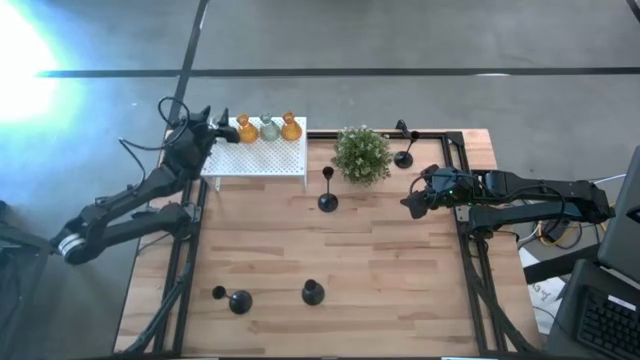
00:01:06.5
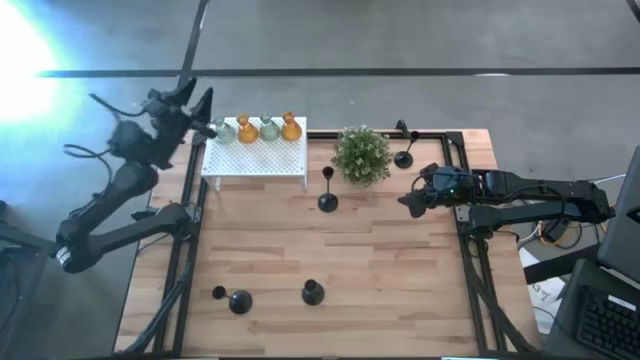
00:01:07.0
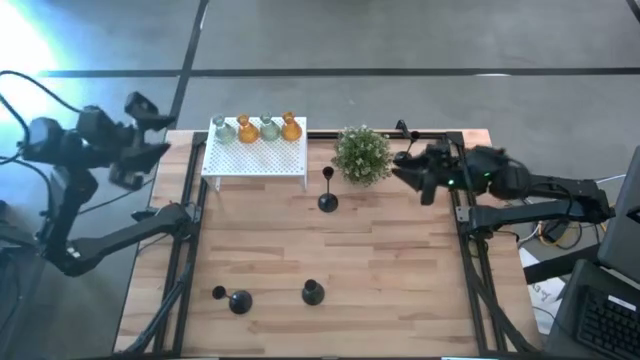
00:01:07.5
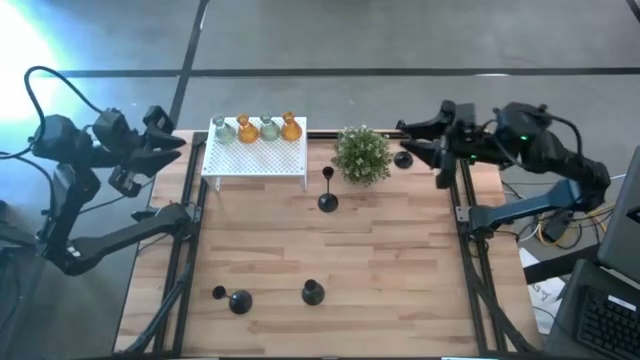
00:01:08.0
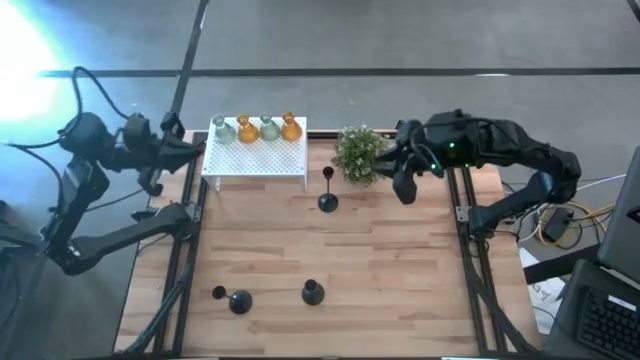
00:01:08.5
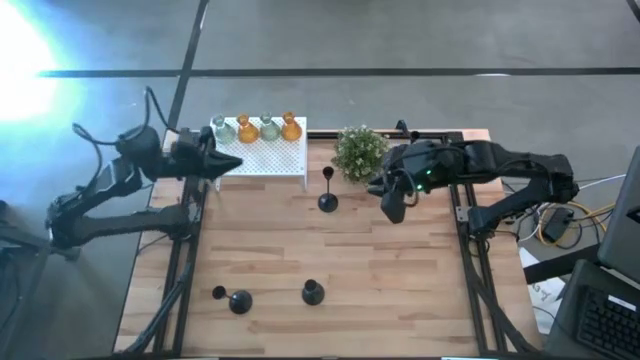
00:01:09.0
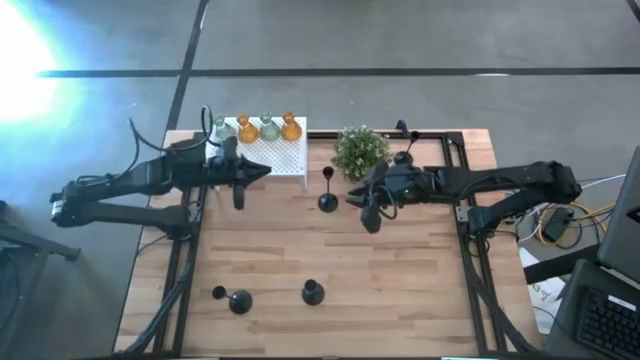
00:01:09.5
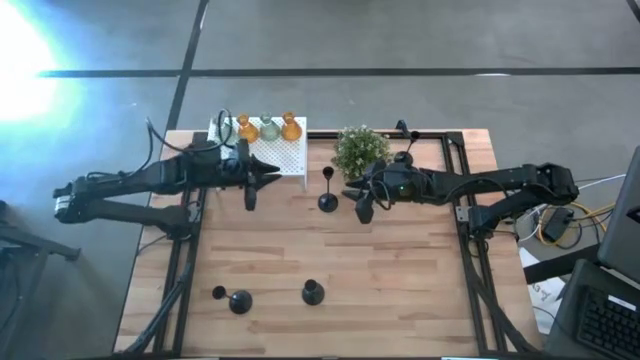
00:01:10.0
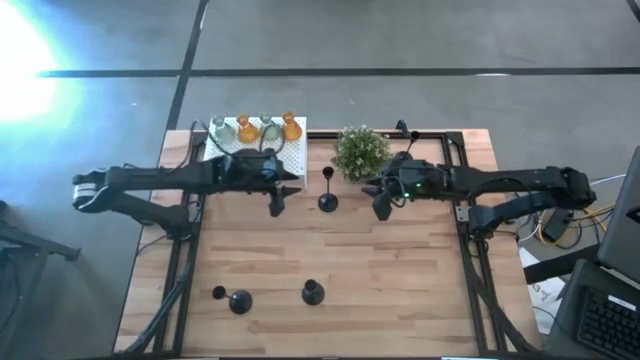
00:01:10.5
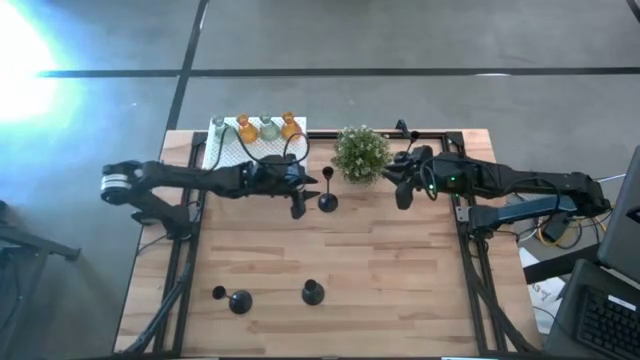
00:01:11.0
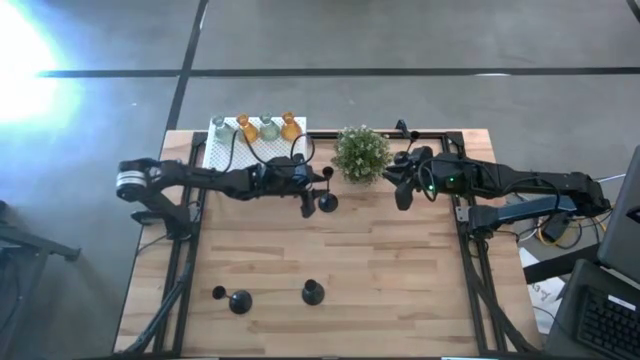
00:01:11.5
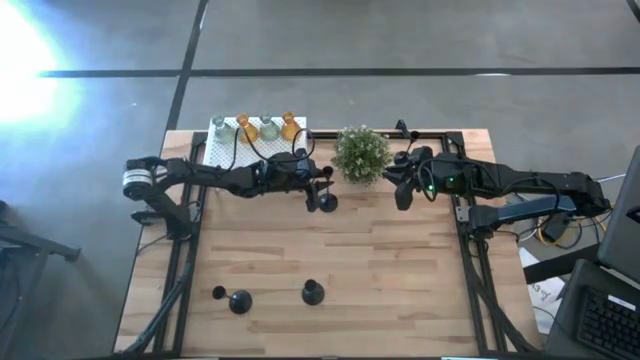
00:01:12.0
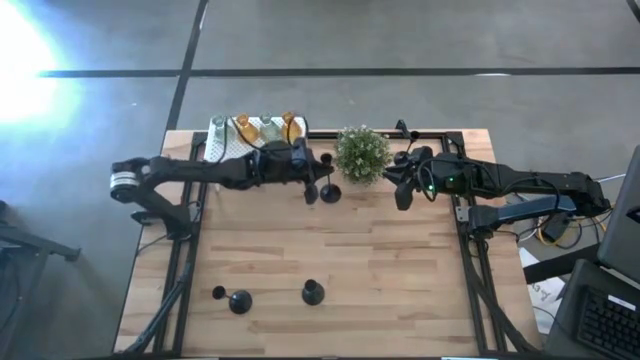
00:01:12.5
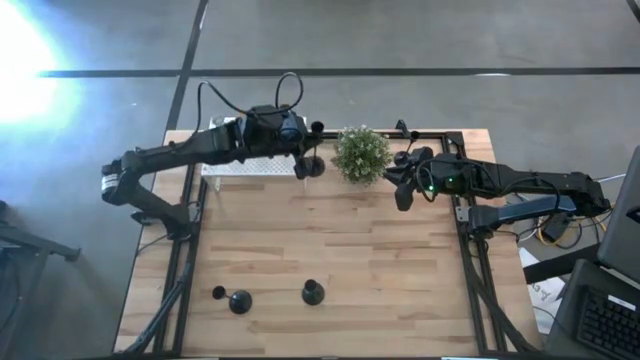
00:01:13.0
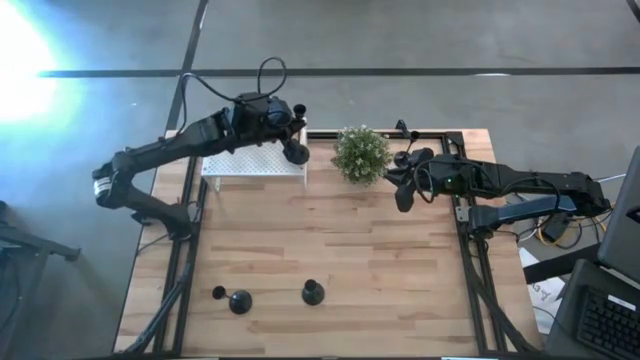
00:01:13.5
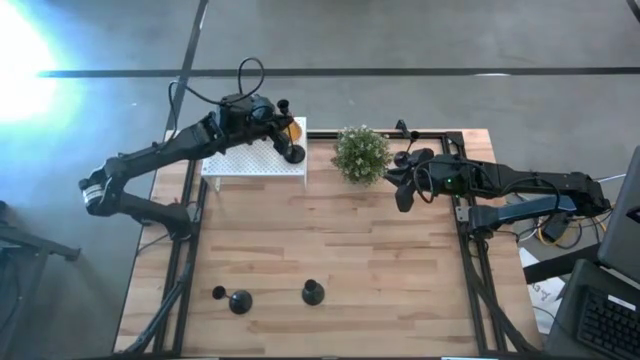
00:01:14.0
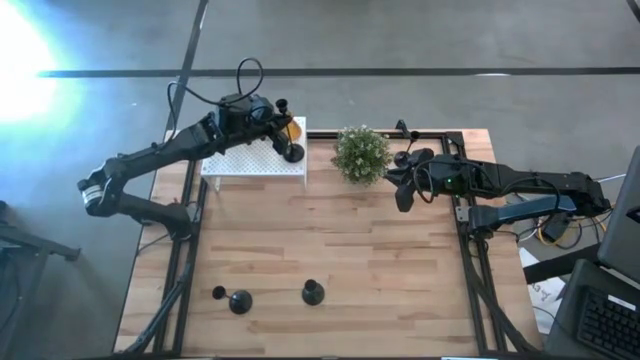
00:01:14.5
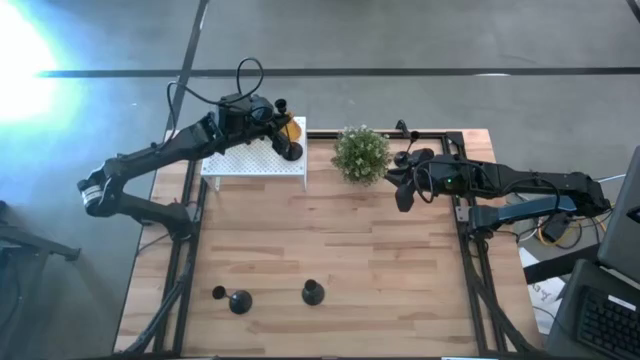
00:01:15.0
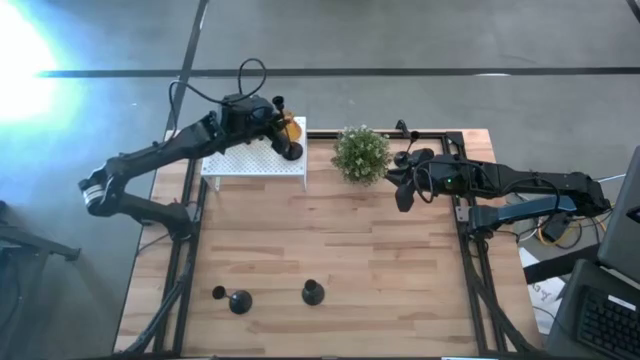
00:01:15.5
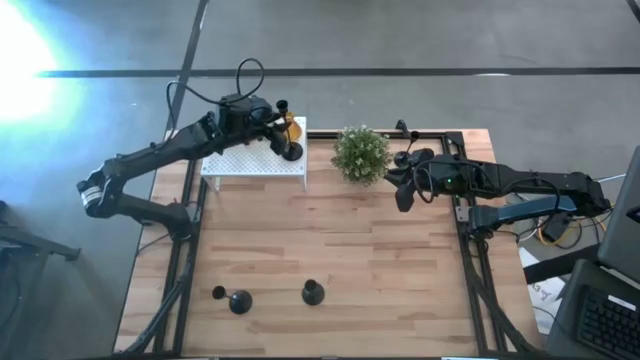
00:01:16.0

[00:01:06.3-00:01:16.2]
Task: Pick & Place candle stick holders
Put the top large black candle holder on the shelf

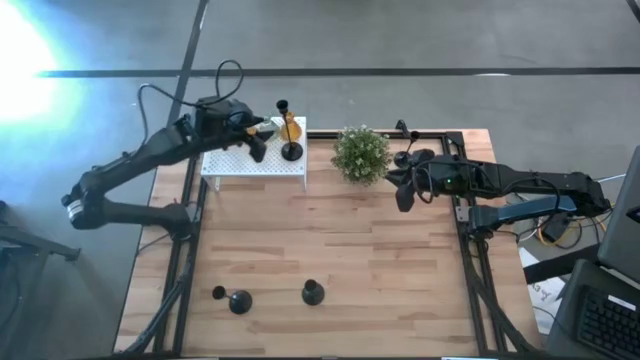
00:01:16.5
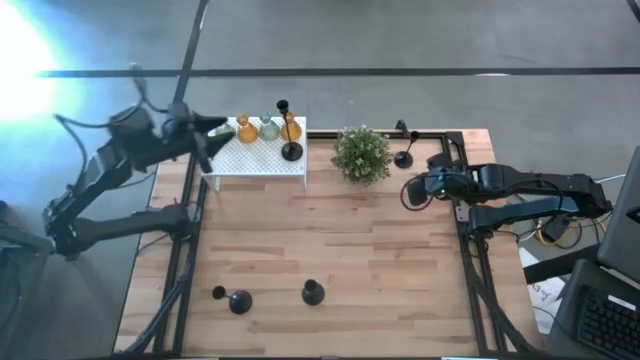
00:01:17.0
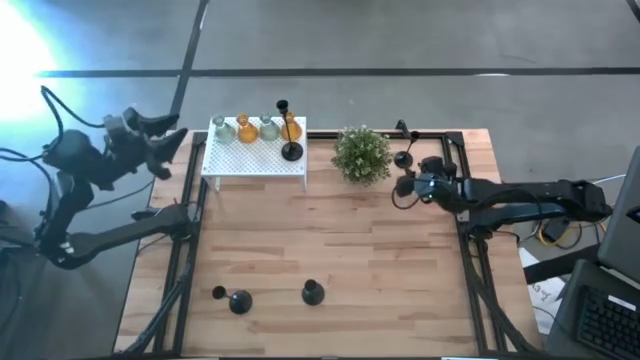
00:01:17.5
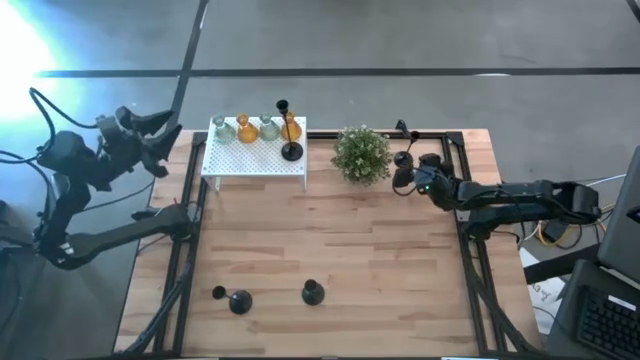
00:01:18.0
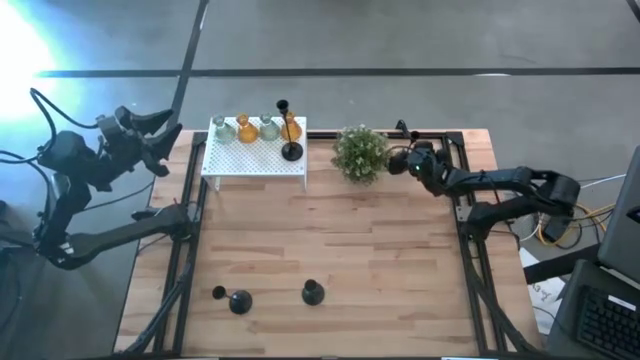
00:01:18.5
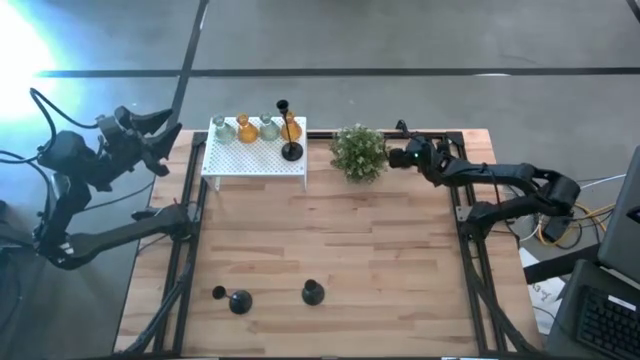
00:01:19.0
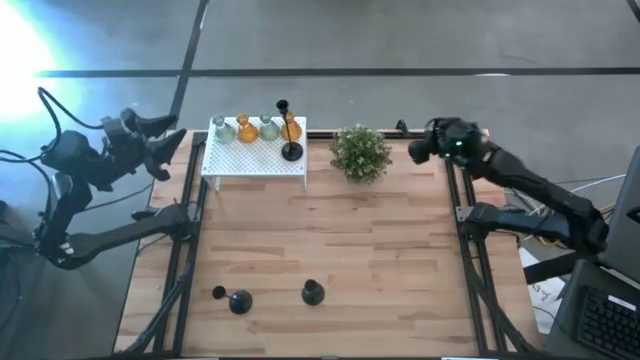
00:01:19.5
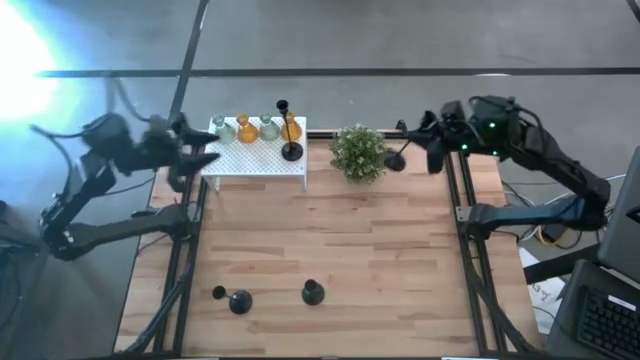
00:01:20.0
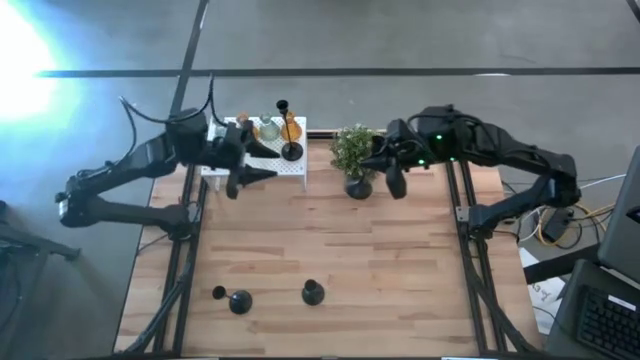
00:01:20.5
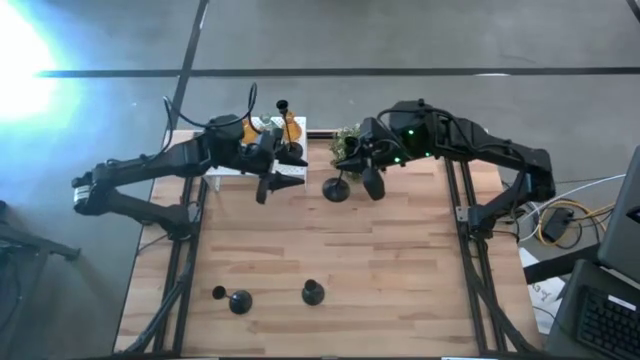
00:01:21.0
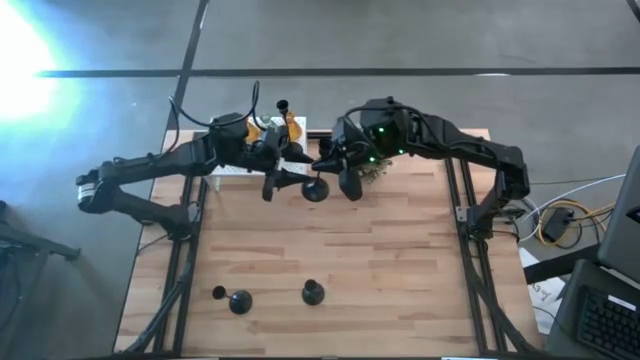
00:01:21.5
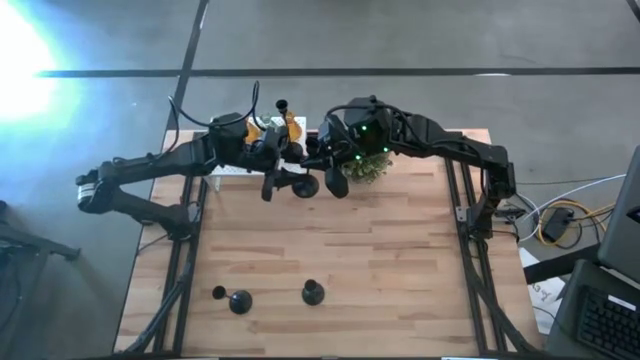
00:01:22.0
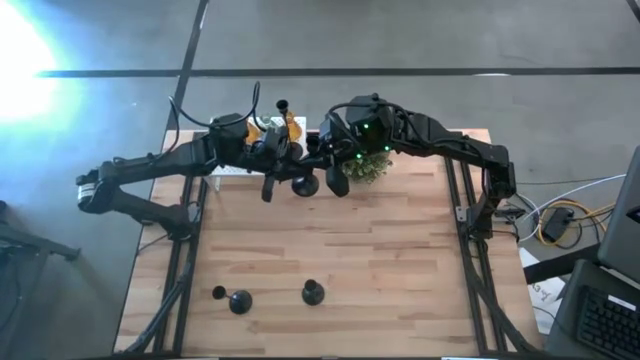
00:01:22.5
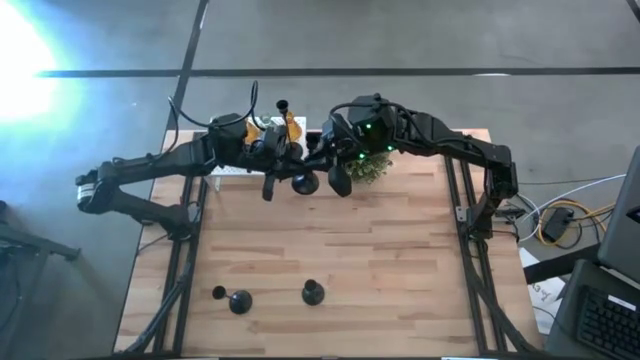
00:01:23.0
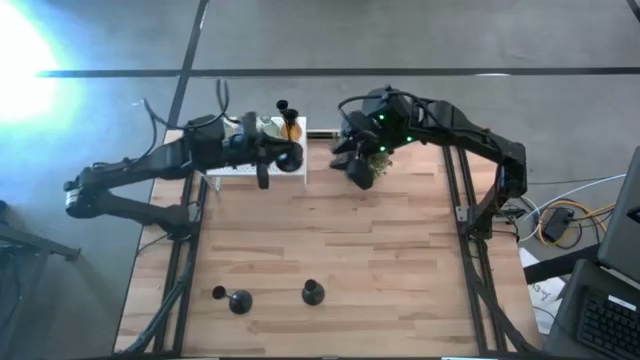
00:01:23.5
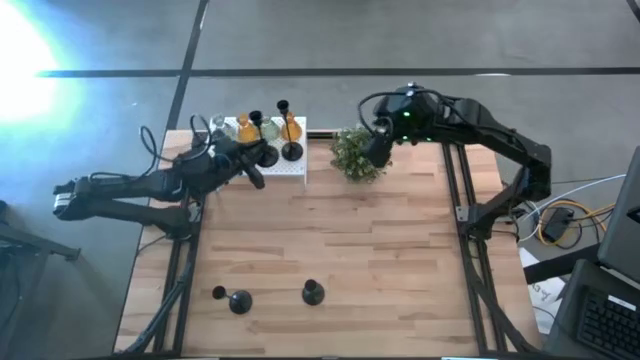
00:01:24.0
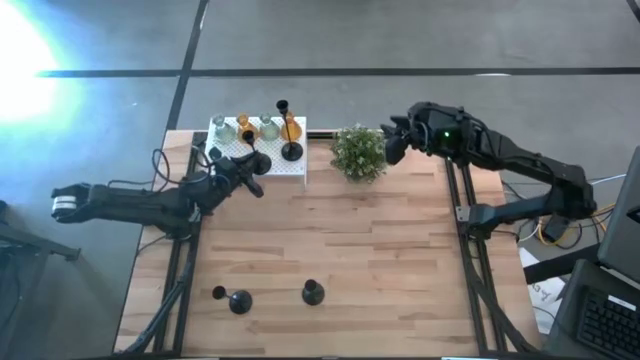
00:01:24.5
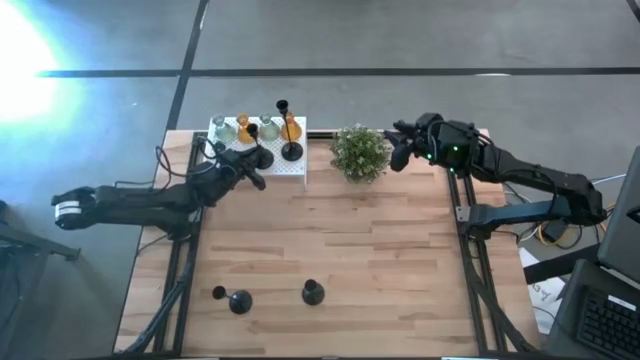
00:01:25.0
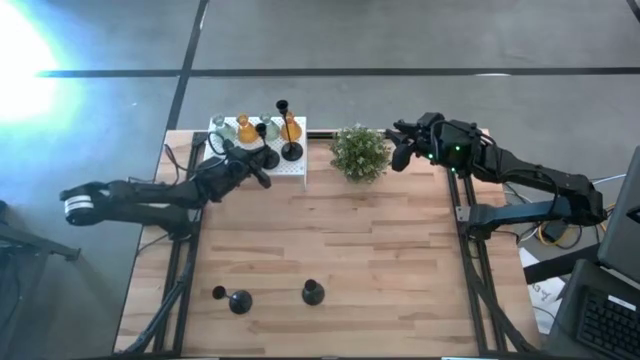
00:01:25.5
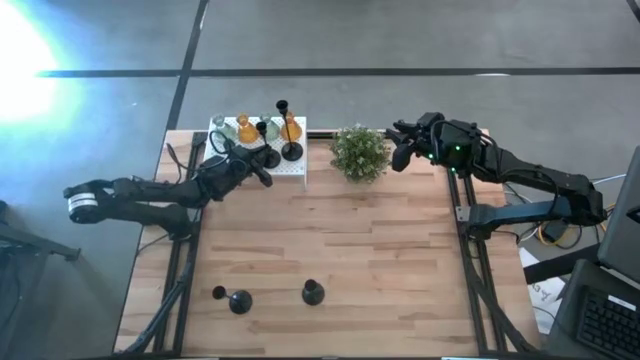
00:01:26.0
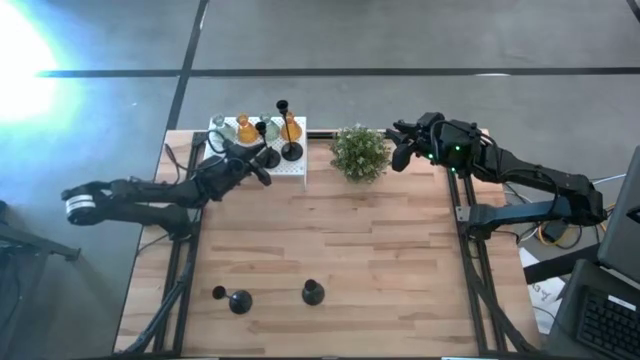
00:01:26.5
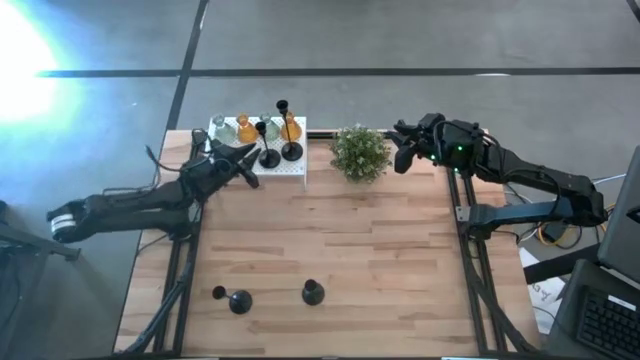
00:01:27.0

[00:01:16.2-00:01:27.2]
Put the top small black candle holder on the shelf
